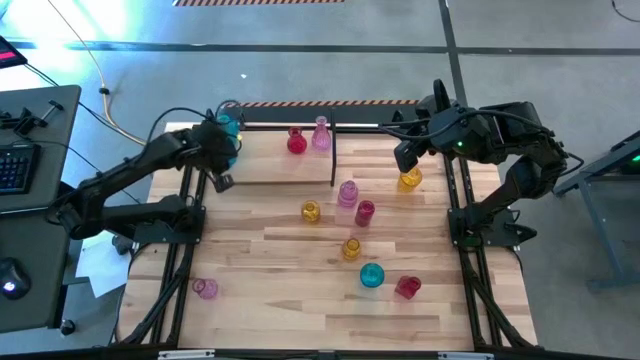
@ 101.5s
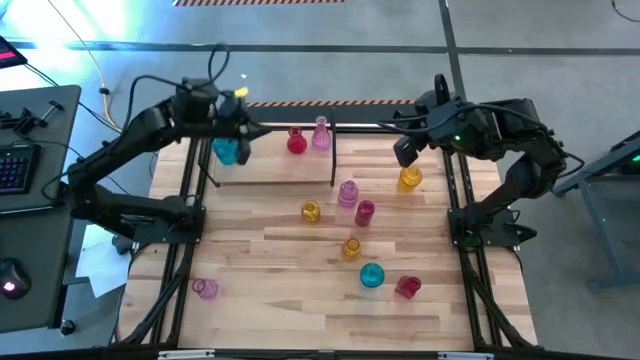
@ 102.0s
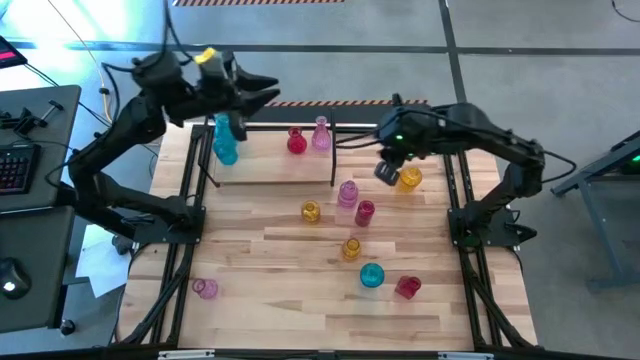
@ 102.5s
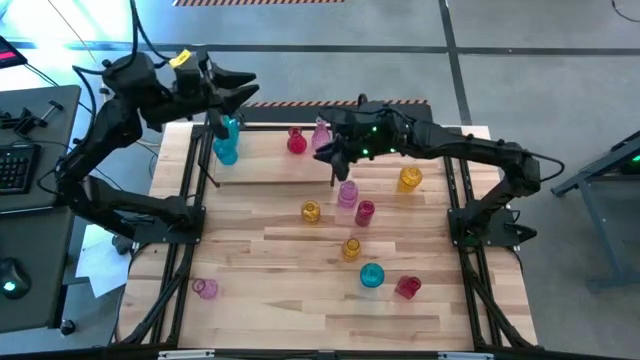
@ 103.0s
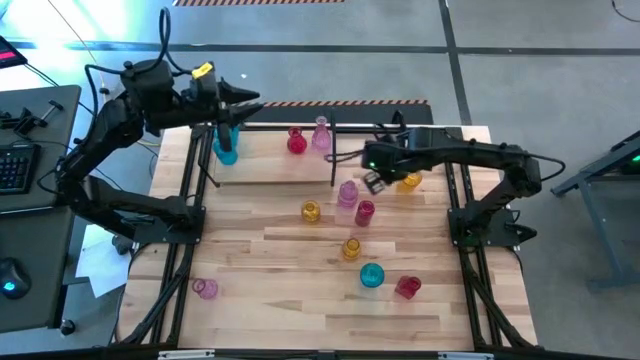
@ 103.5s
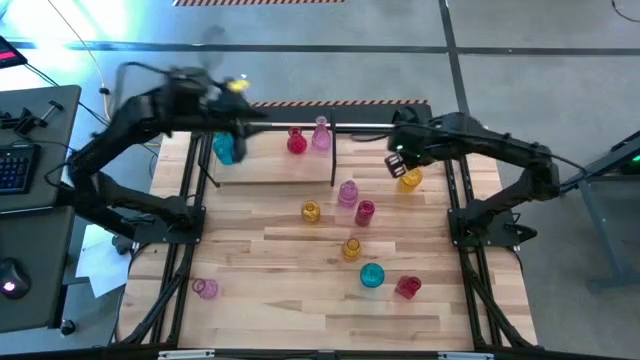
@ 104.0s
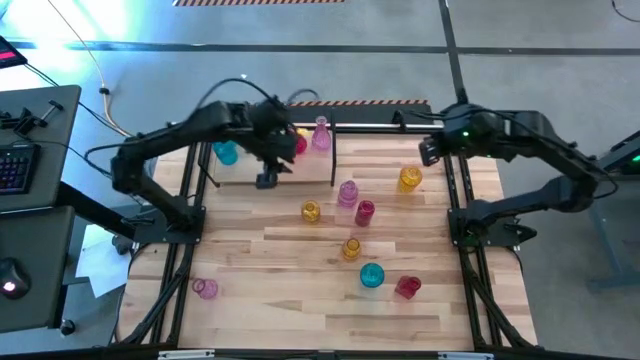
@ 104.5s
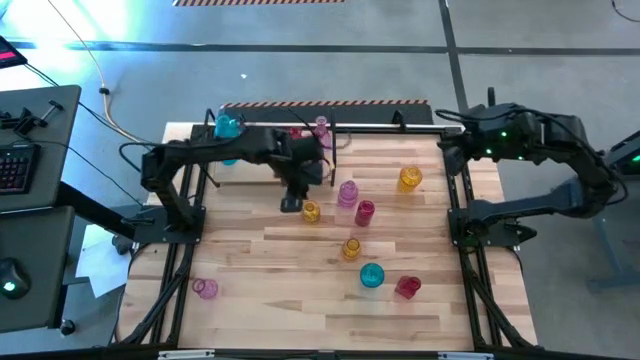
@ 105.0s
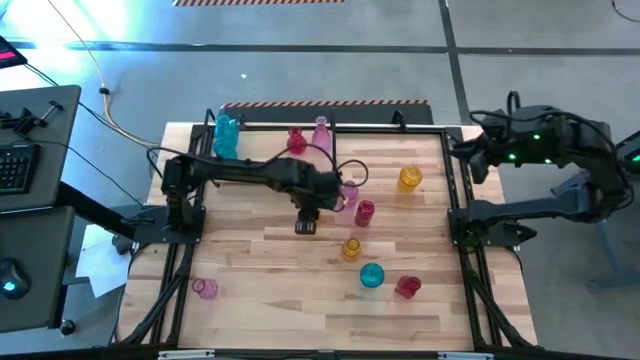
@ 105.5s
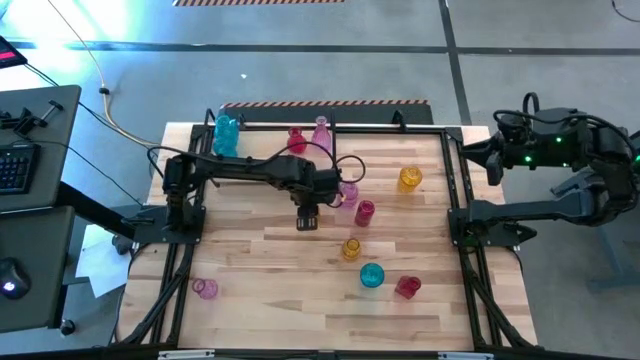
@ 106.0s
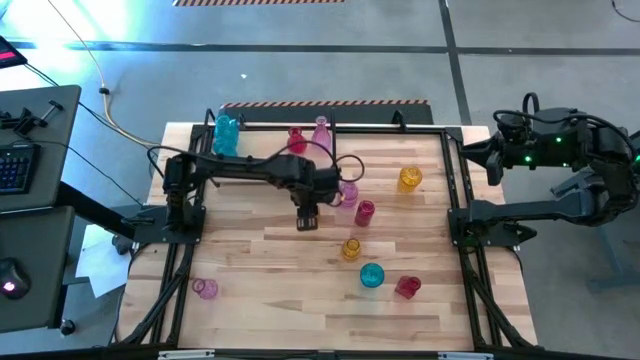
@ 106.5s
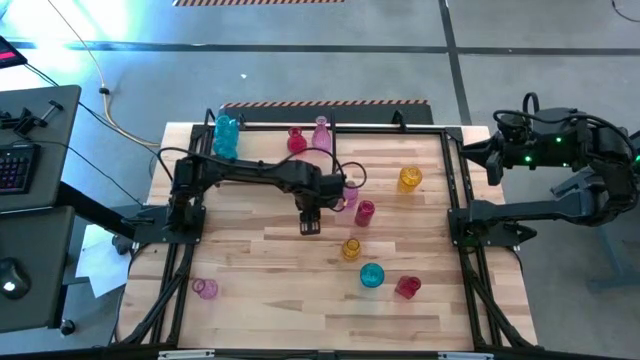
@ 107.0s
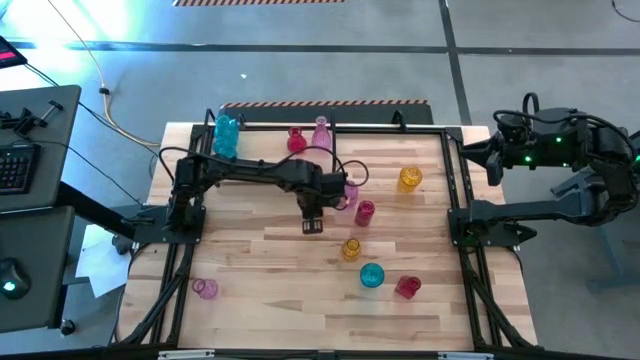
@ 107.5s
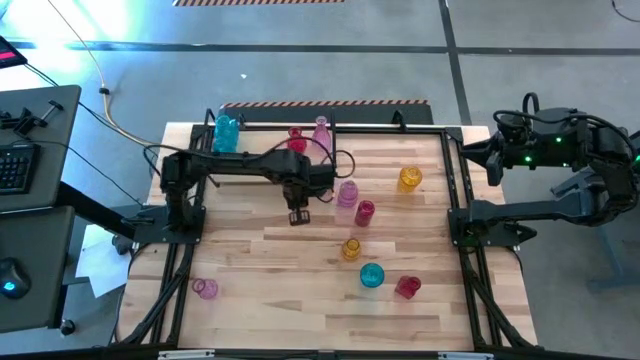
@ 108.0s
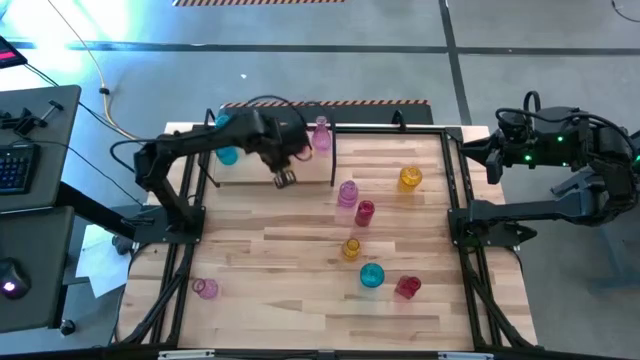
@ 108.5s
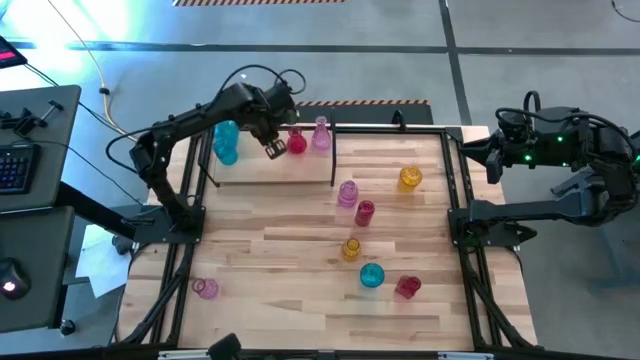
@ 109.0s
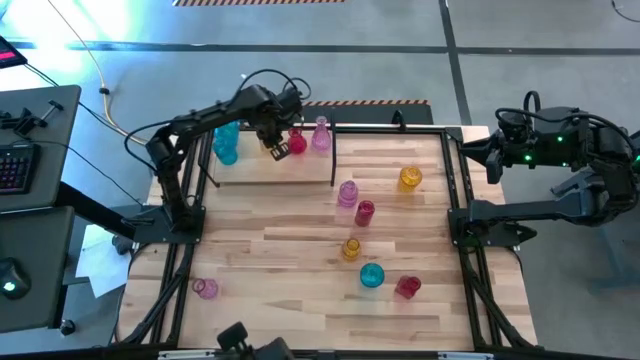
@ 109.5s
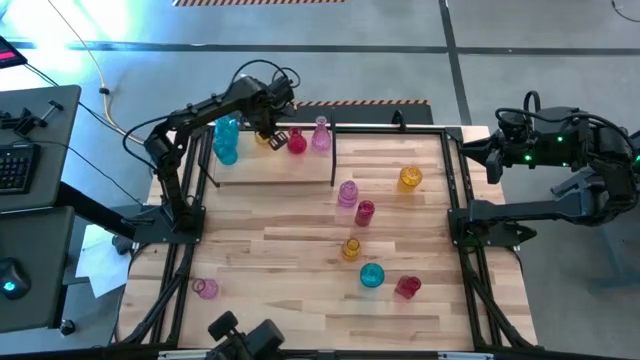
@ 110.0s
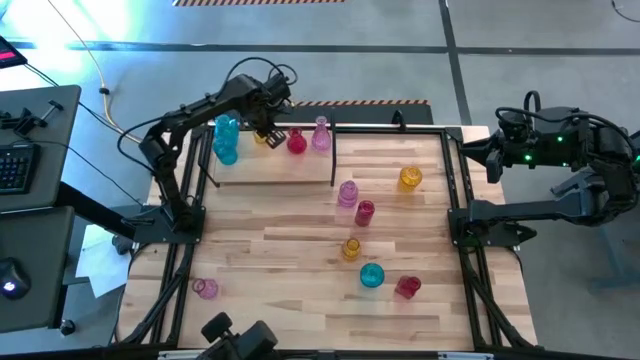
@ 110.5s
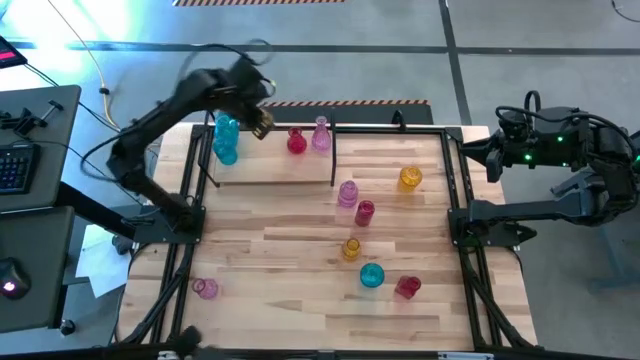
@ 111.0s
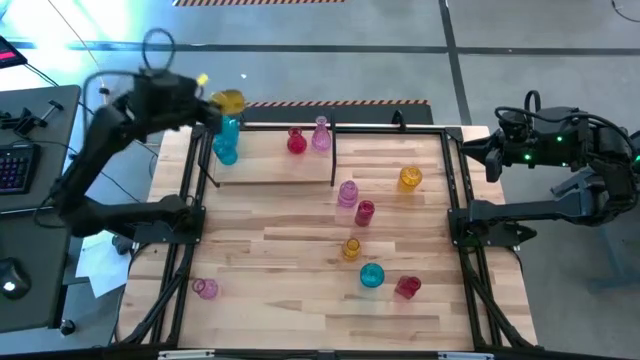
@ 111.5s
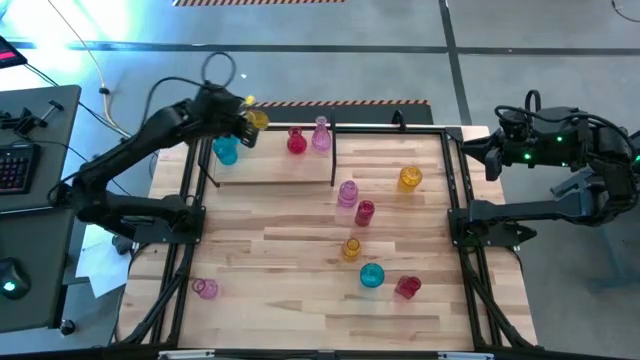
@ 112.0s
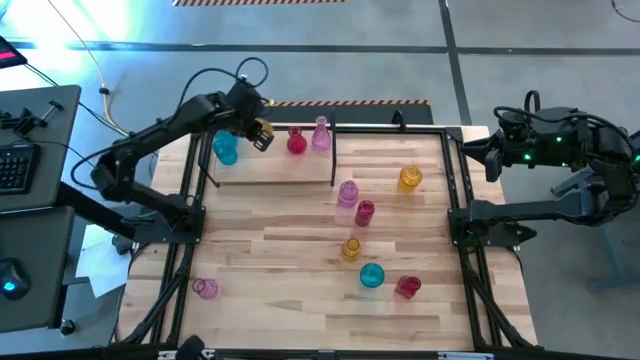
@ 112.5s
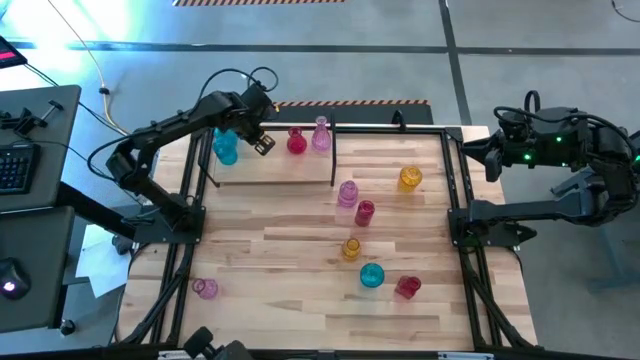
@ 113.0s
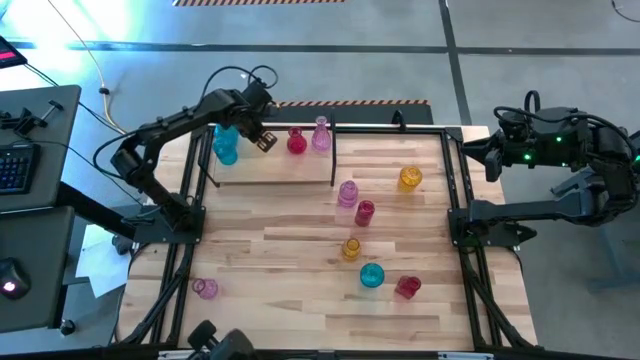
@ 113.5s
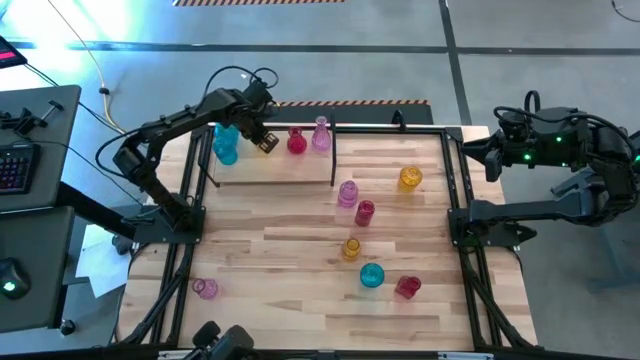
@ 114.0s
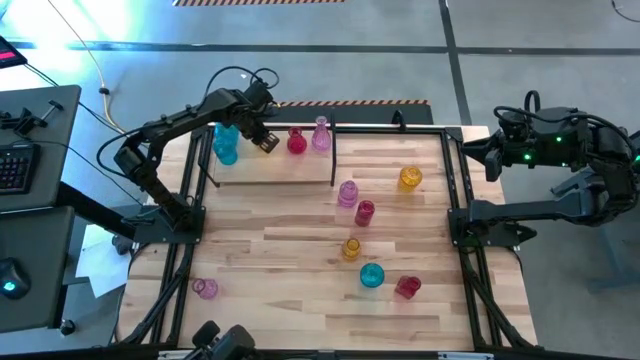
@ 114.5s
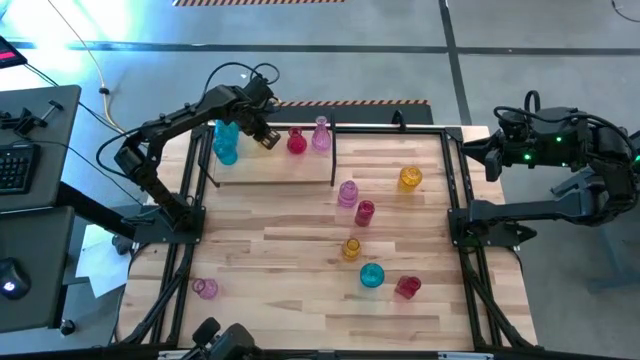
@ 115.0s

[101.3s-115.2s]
Task: sort vases onto shelf
Put the middle yellow vase on the shelf

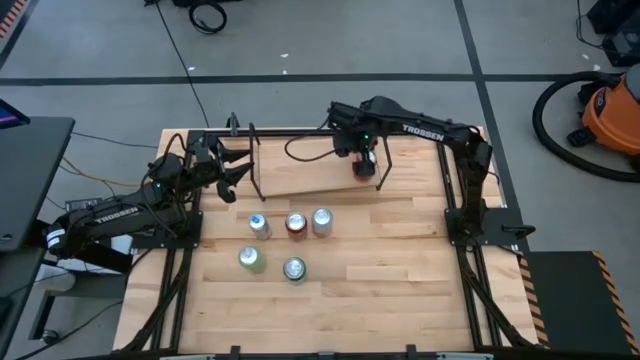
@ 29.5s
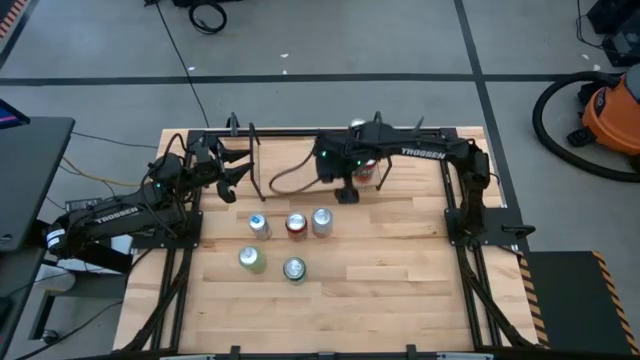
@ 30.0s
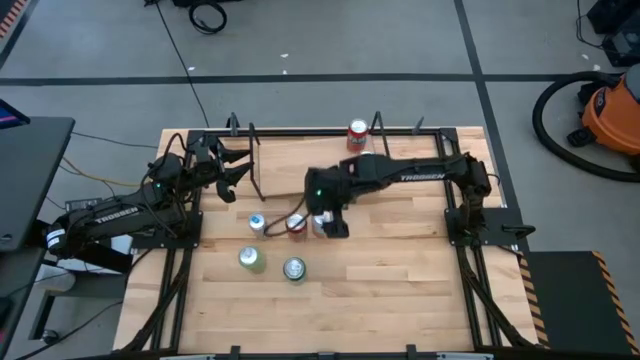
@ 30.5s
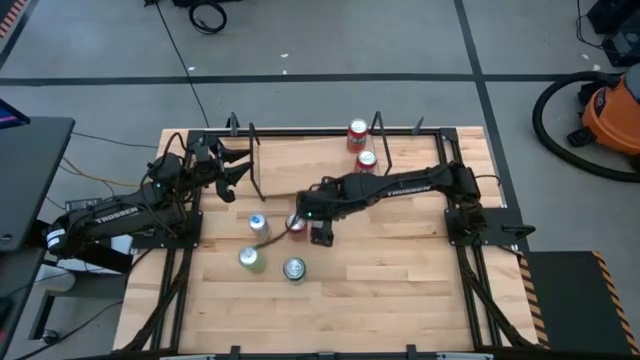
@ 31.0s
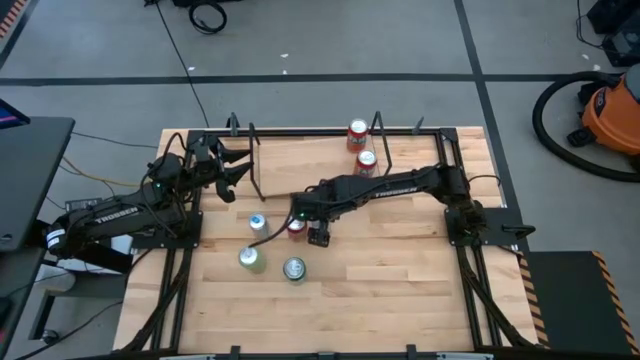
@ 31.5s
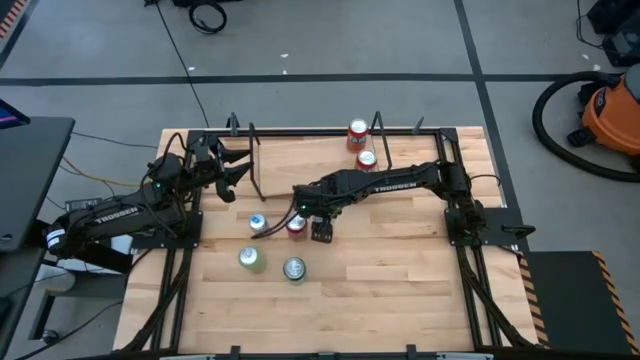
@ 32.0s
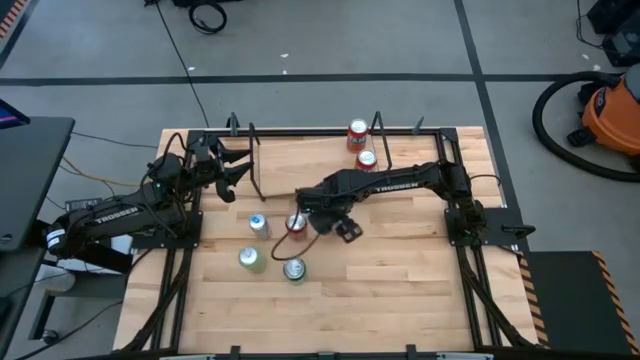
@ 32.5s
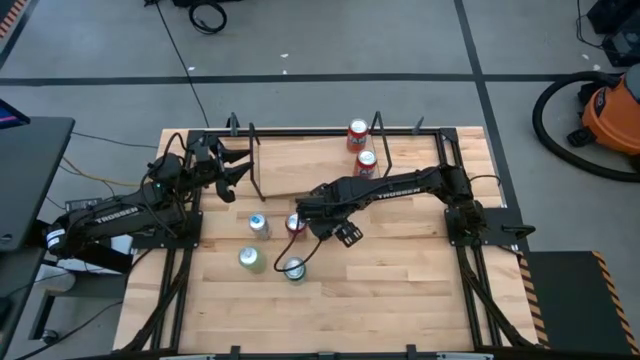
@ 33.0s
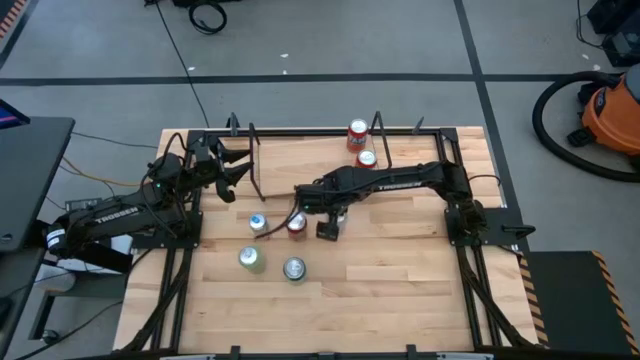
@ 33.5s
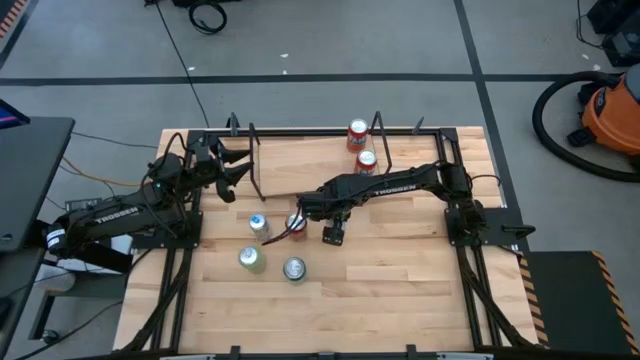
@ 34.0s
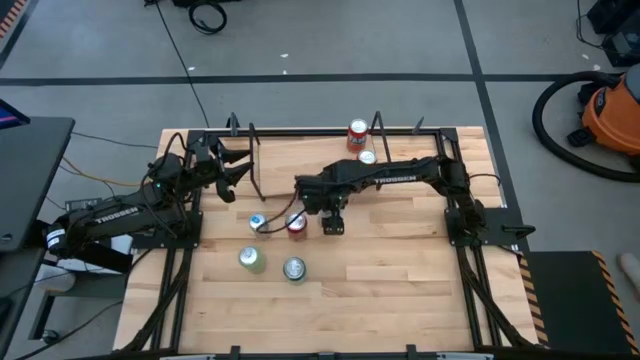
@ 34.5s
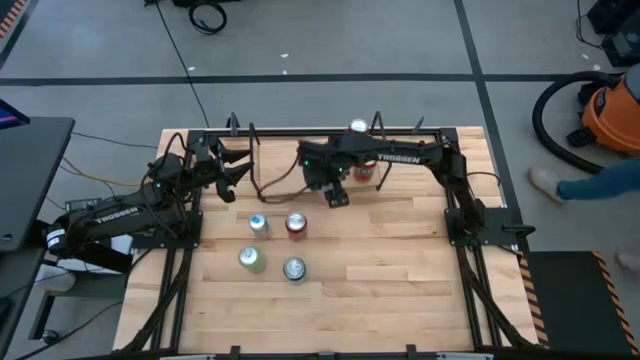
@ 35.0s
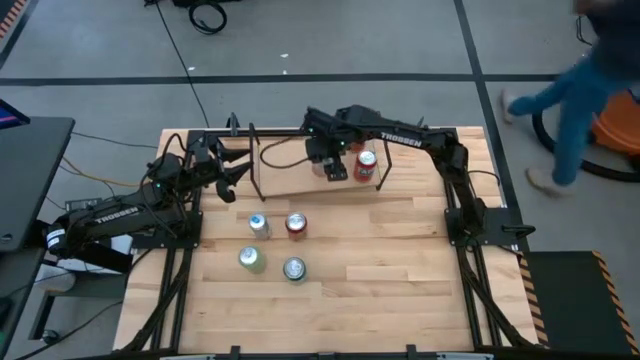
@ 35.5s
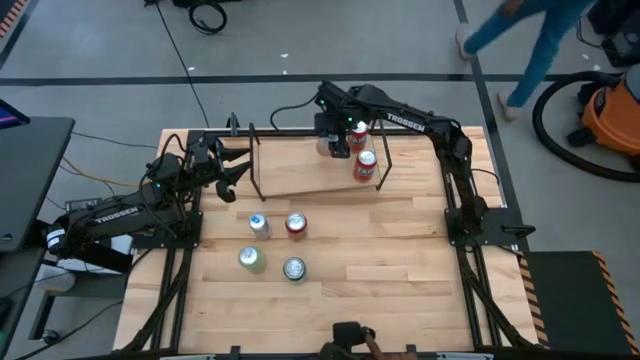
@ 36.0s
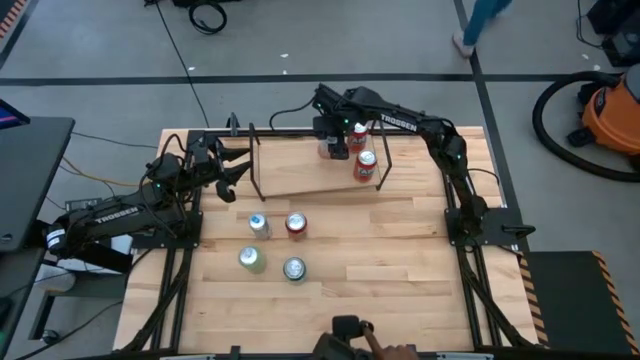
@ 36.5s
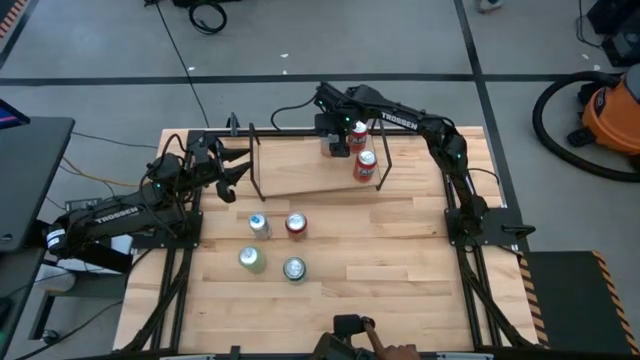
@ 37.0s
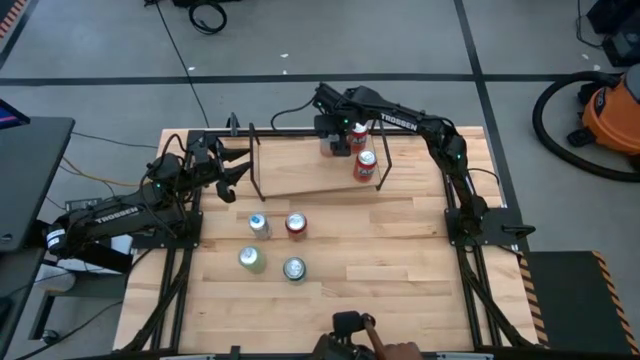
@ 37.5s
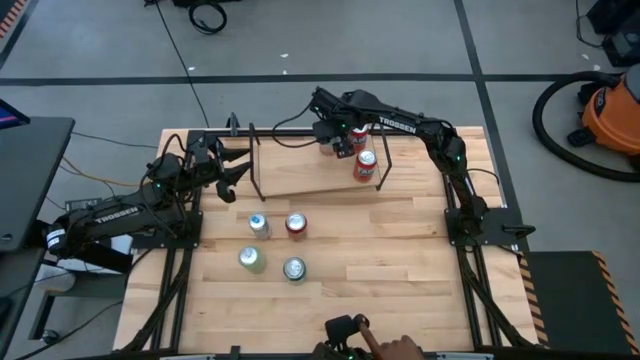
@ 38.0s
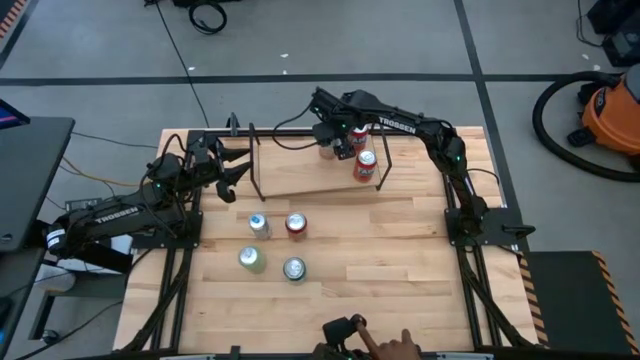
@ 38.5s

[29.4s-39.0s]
Task: Place canned beverage on shelf
Put the orange-white soda can on the shelf
